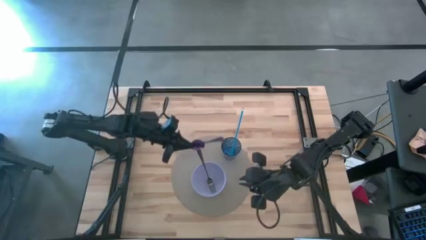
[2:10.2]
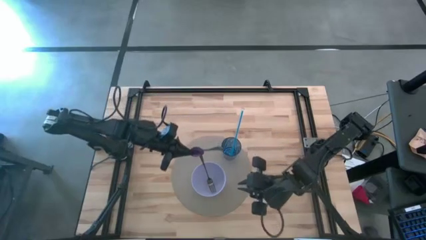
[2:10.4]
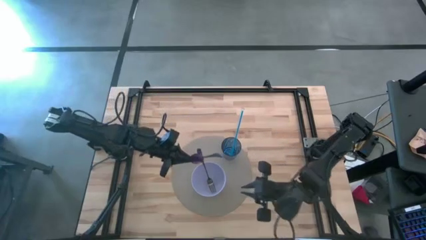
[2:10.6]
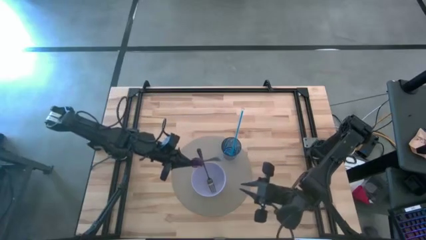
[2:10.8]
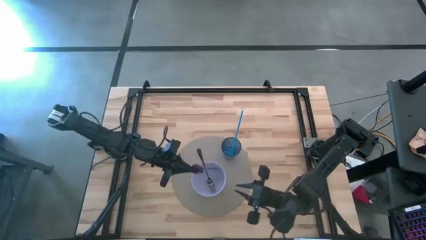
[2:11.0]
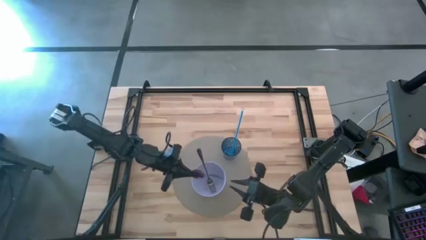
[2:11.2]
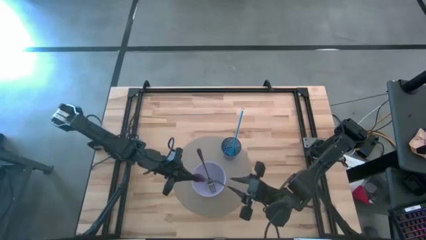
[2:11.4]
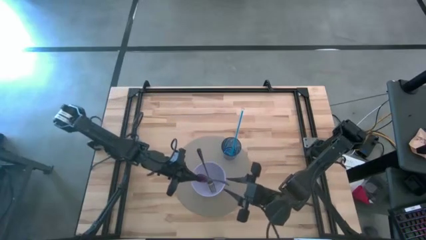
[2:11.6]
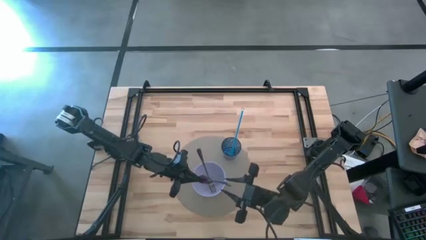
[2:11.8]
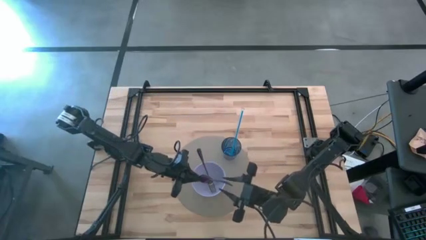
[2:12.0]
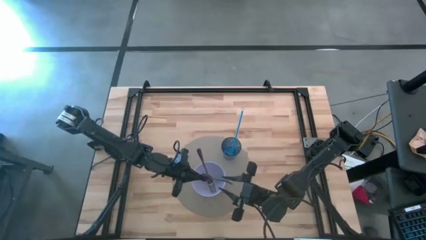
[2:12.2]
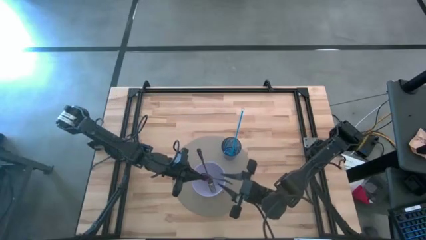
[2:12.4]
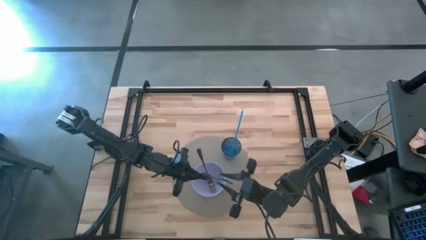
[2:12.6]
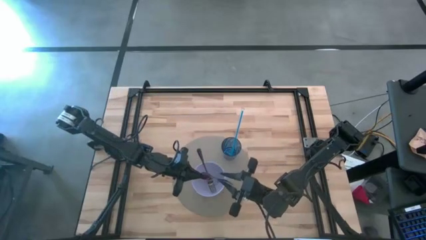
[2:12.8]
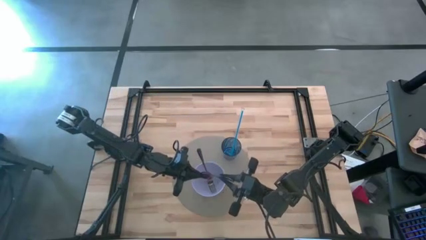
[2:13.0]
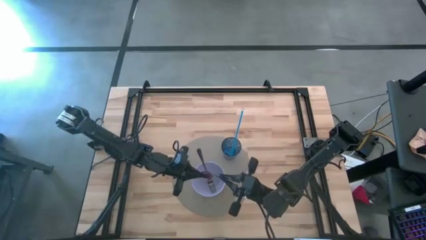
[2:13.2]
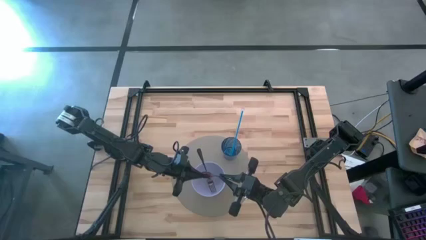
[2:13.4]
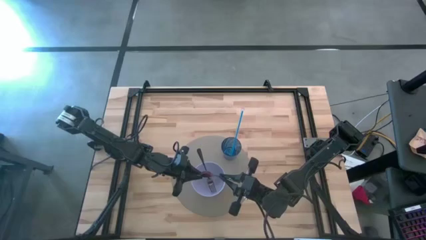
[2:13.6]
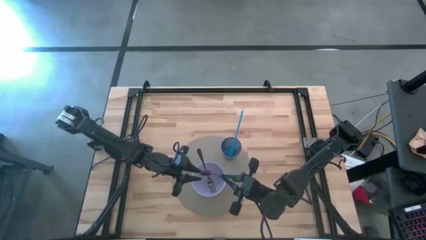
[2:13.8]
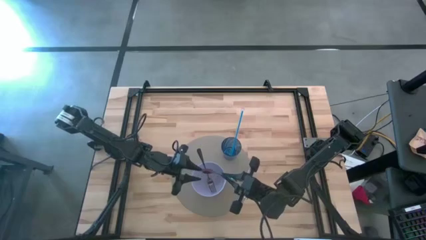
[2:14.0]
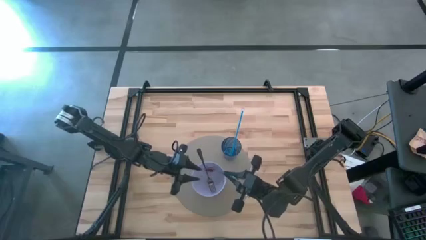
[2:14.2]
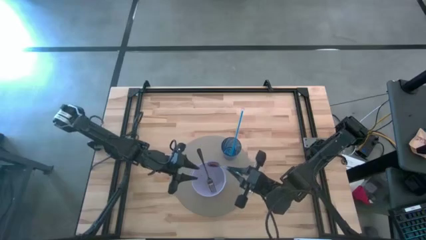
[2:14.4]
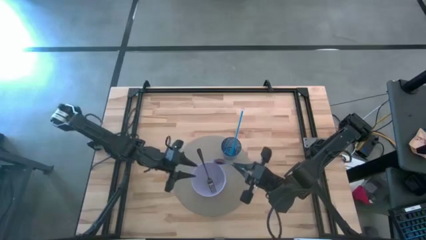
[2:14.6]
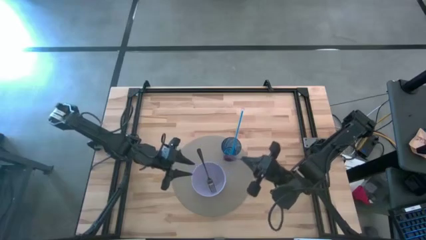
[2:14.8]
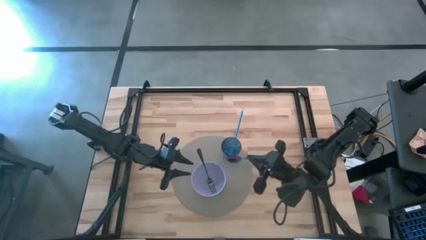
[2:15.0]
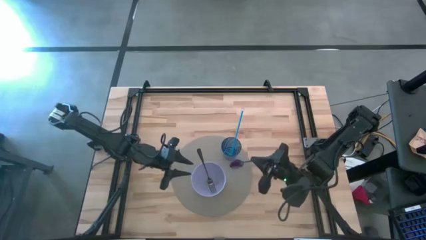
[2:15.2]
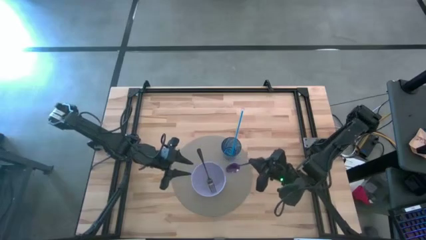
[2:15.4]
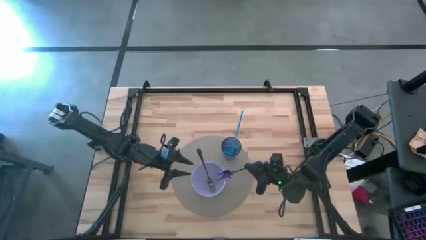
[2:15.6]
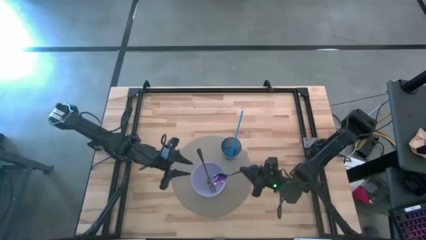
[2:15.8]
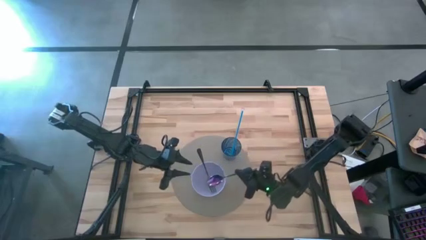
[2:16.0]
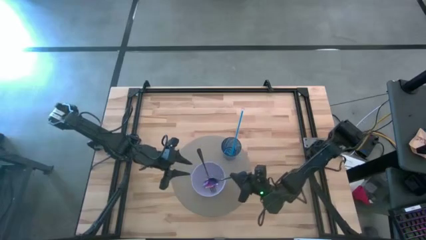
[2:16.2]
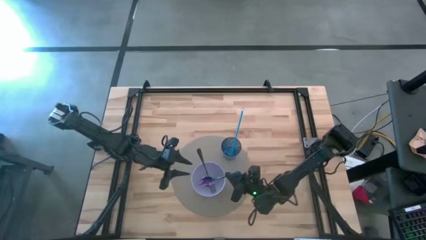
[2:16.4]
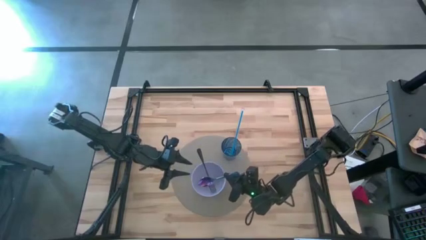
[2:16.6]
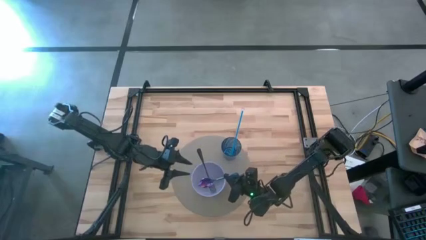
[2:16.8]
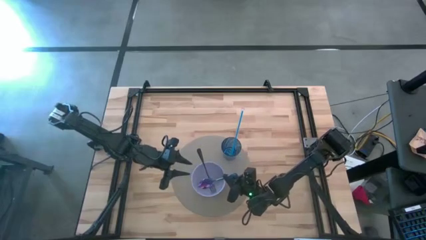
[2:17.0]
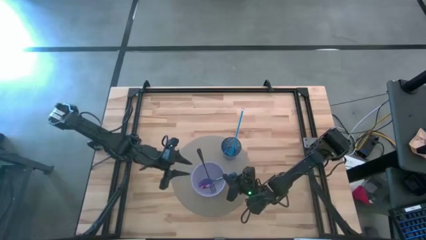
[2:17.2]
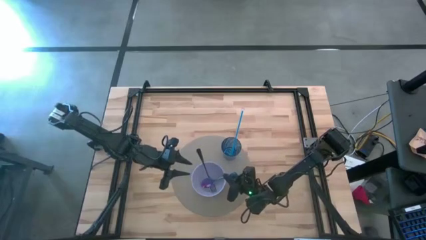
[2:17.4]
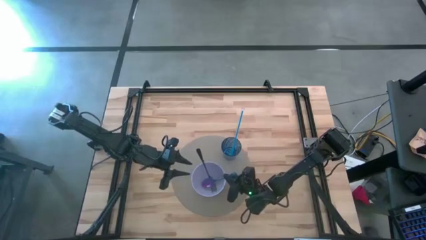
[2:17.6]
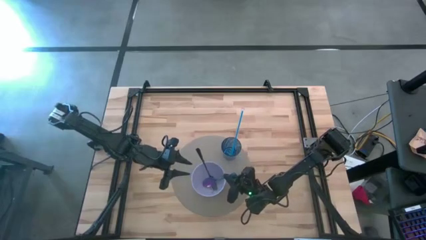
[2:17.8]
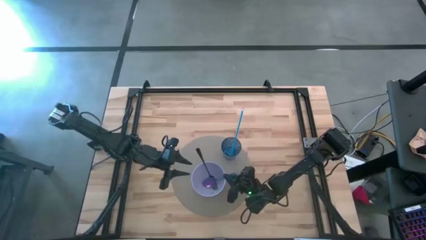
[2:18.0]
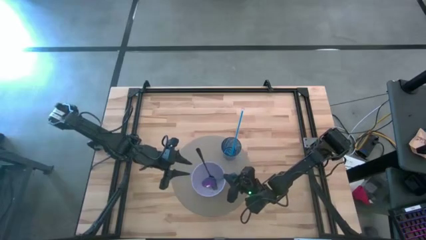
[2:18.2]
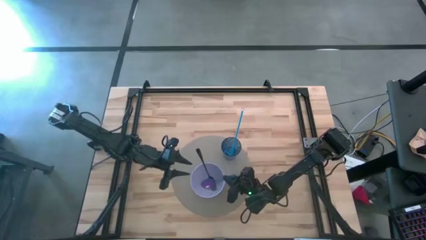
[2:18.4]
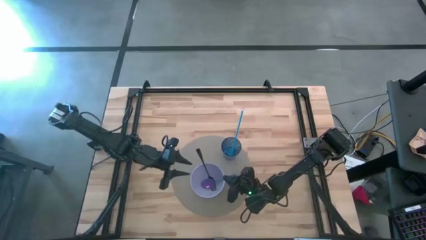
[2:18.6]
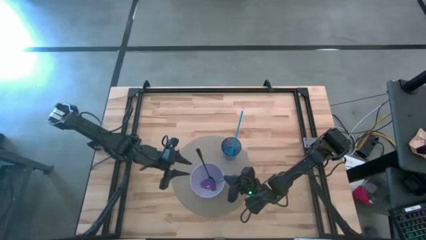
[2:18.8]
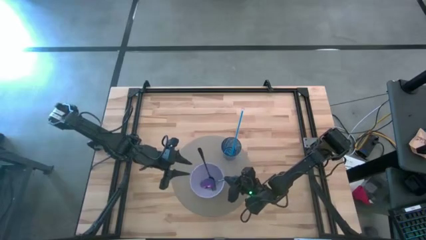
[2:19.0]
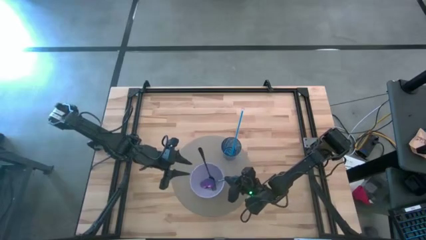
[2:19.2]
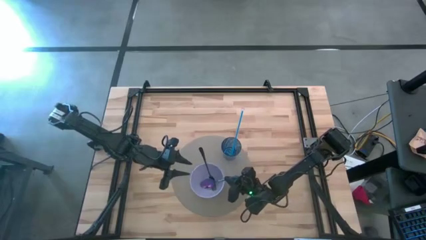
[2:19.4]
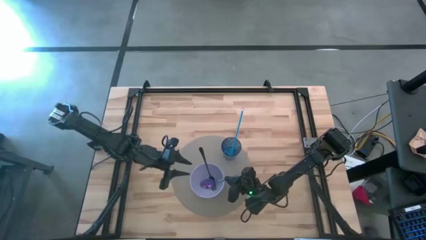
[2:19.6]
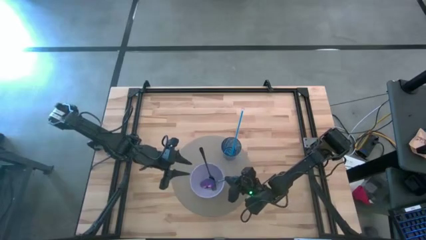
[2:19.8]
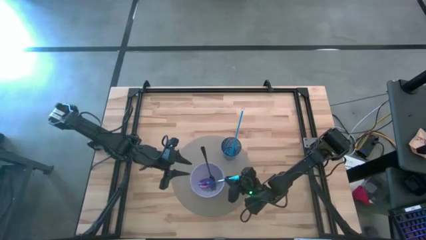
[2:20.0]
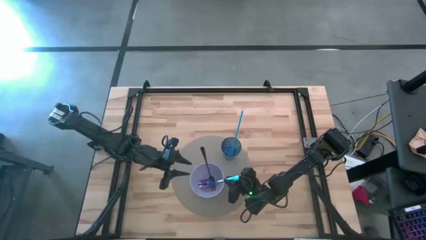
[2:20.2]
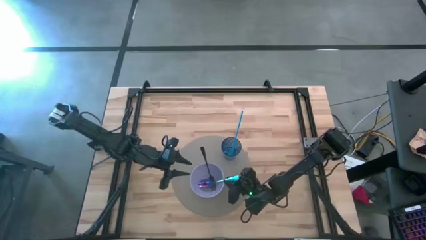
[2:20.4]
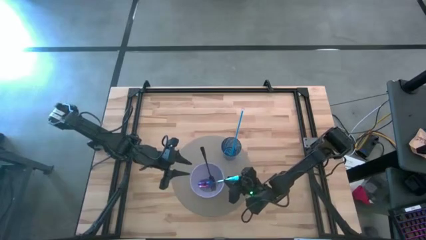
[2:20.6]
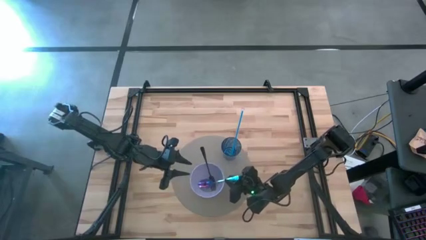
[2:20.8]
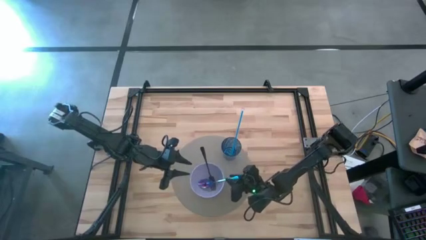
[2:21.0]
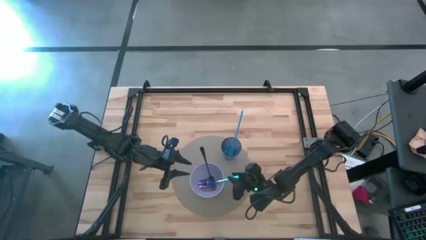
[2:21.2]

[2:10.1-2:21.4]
Task: Pick & Place Utensil
Put the spoon into the bowl

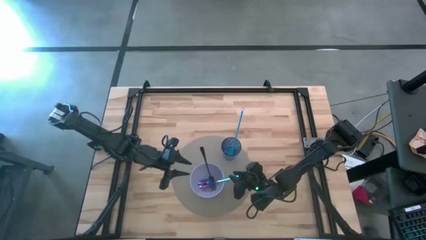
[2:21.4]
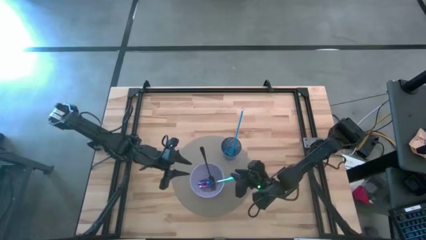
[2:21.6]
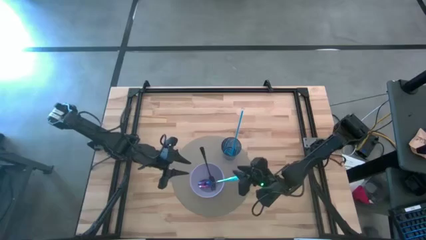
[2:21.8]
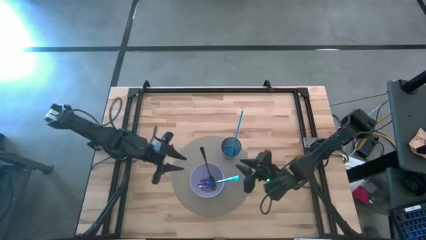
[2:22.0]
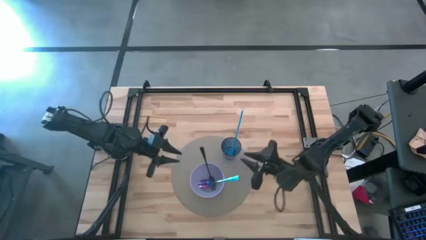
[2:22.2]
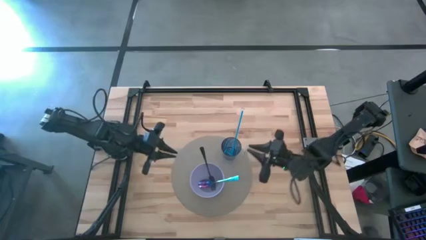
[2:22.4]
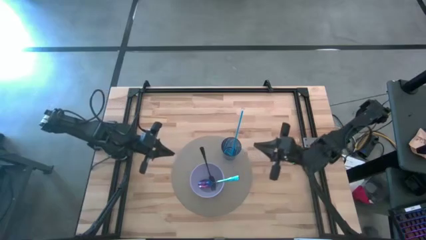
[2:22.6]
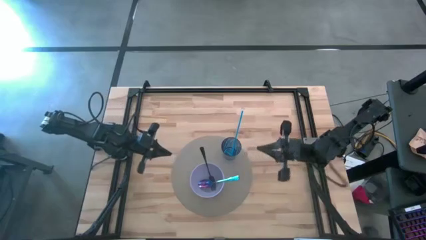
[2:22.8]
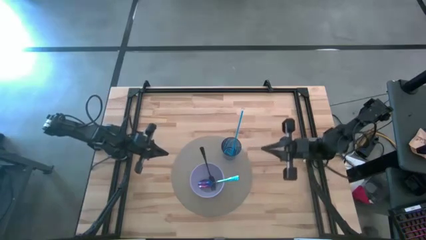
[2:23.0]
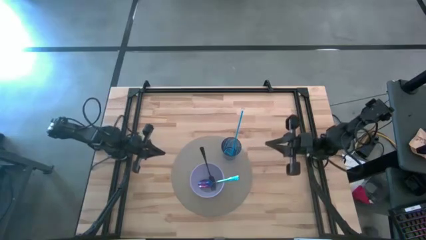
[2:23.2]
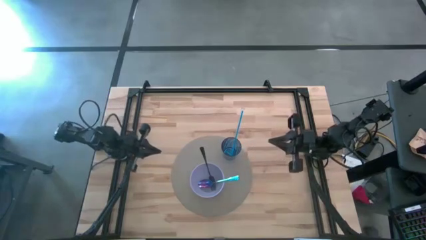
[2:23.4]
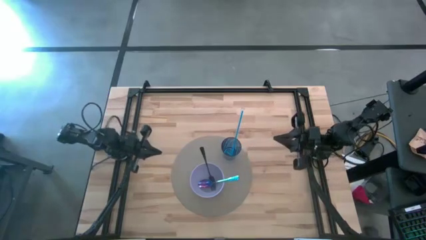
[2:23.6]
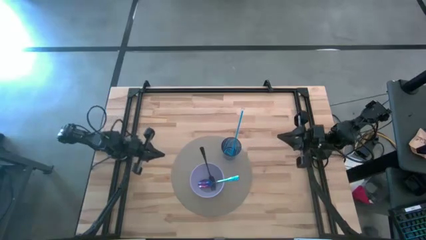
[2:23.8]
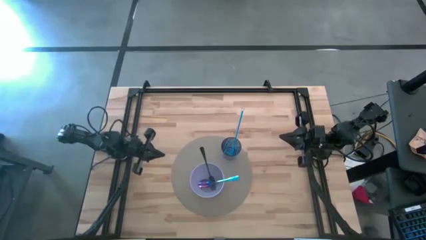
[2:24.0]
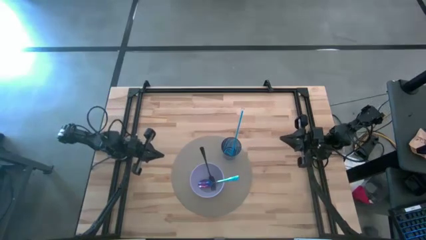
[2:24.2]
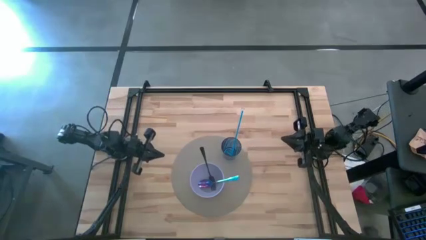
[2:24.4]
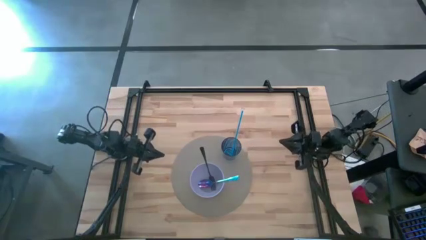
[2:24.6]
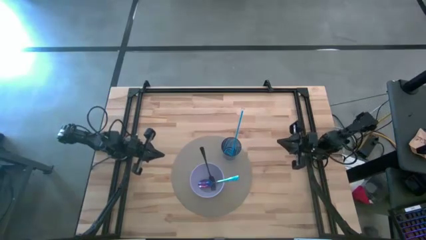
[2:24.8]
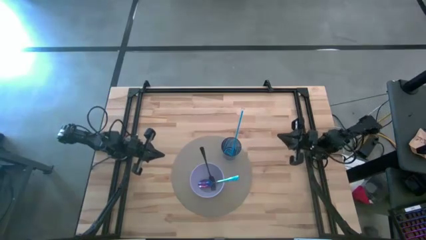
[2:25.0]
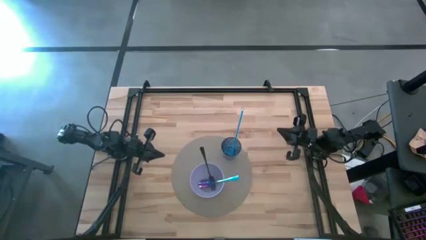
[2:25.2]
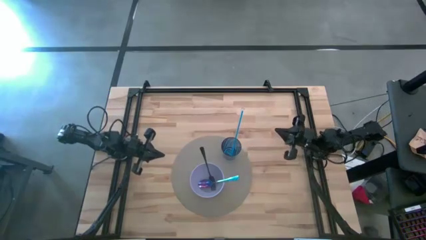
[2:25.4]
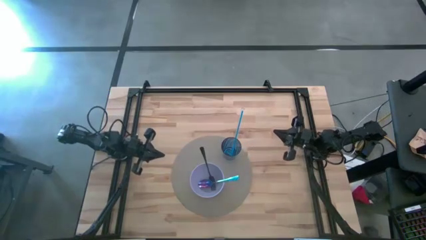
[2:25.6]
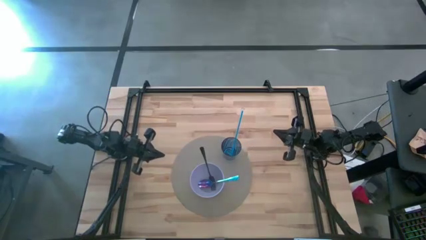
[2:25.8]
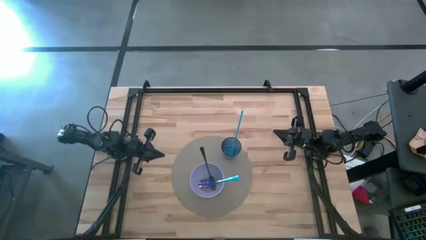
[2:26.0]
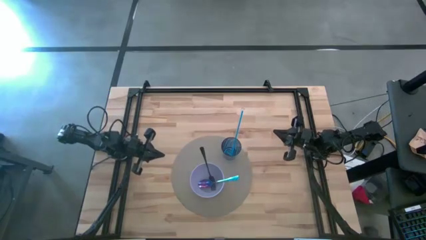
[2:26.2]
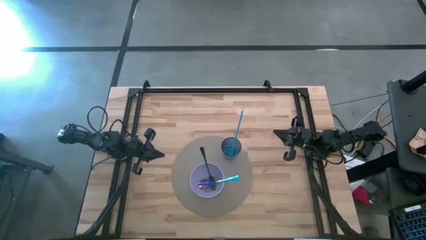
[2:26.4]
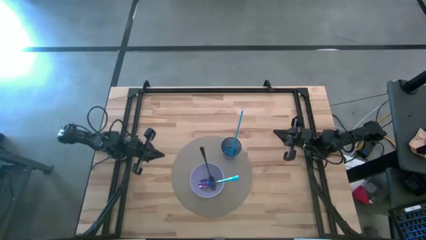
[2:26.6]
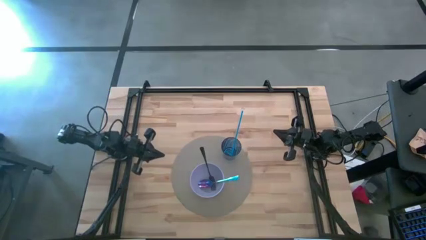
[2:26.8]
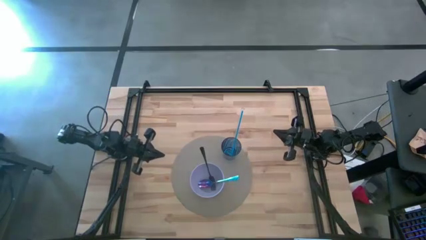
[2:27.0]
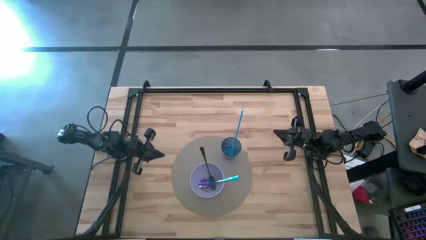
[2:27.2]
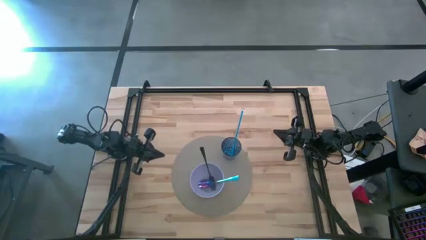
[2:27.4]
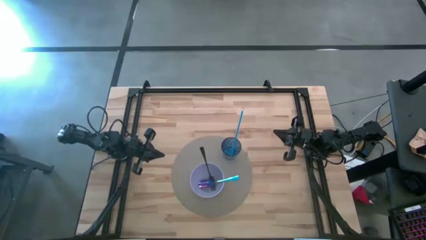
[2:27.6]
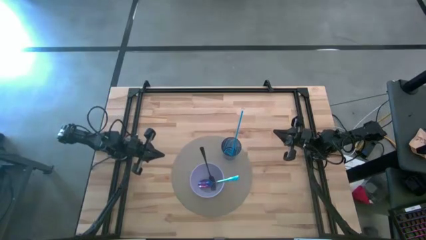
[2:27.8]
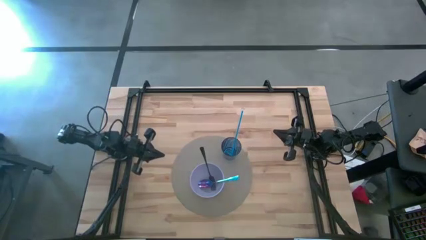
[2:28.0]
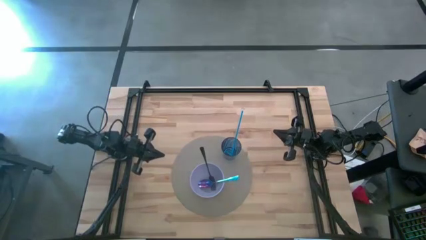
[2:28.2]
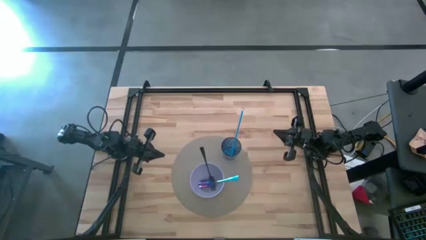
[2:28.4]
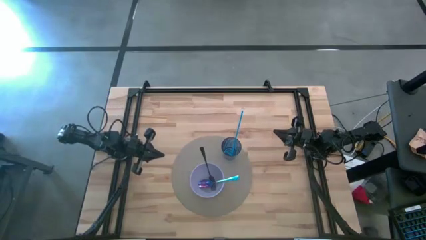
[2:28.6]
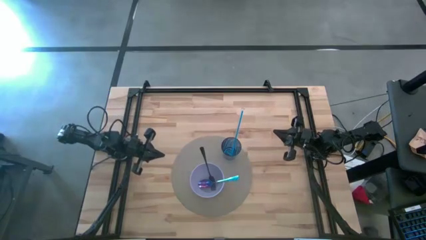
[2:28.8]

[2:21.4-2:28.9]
Return to Home Position
